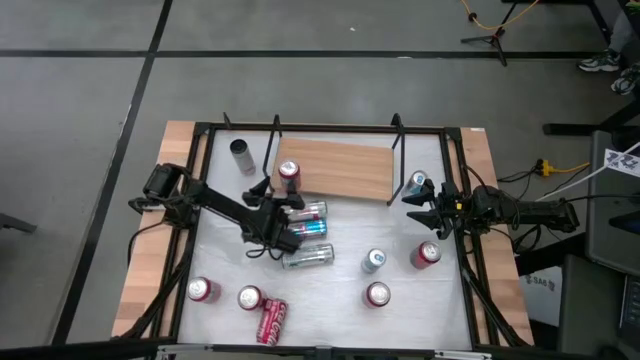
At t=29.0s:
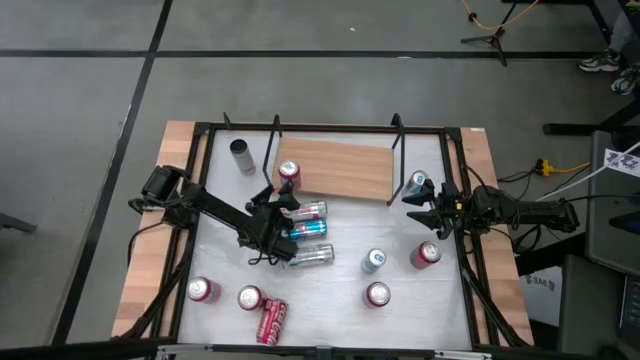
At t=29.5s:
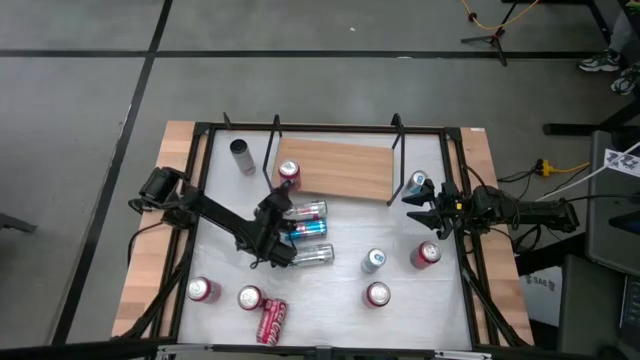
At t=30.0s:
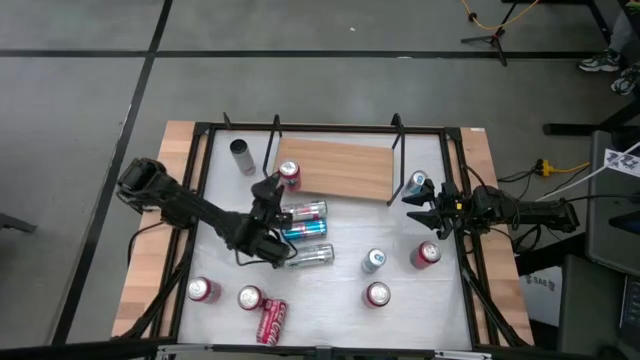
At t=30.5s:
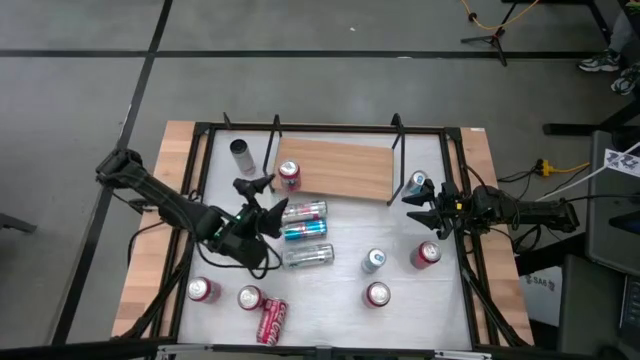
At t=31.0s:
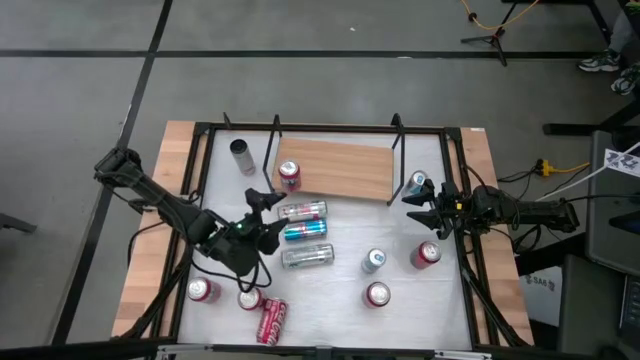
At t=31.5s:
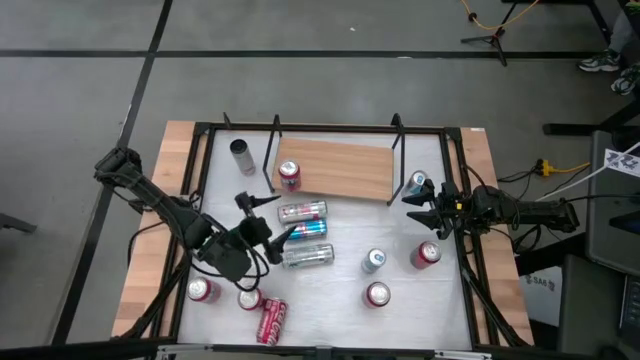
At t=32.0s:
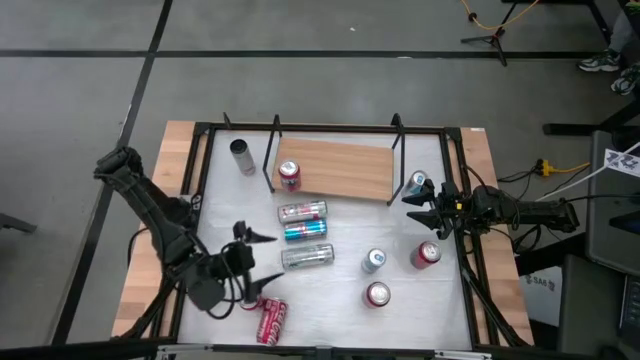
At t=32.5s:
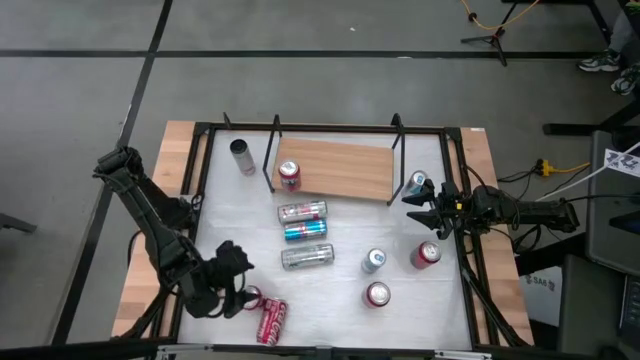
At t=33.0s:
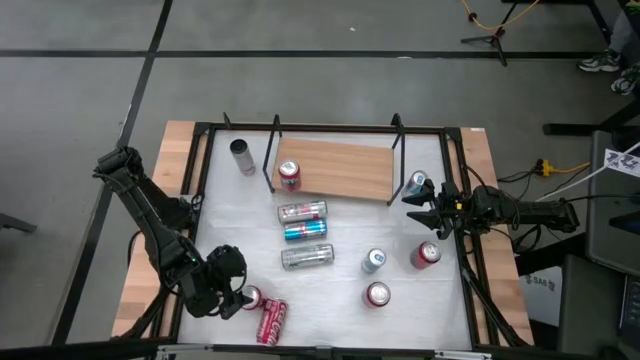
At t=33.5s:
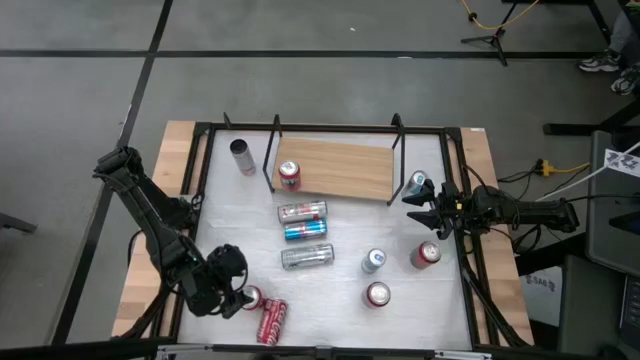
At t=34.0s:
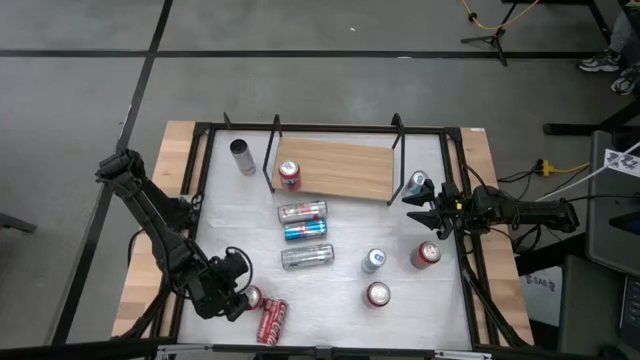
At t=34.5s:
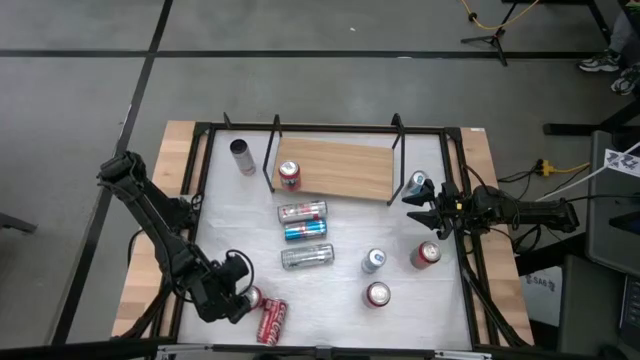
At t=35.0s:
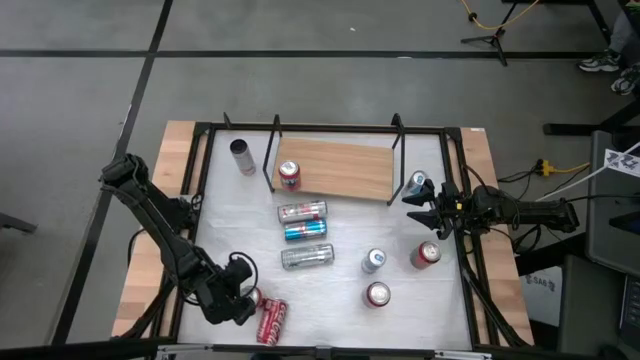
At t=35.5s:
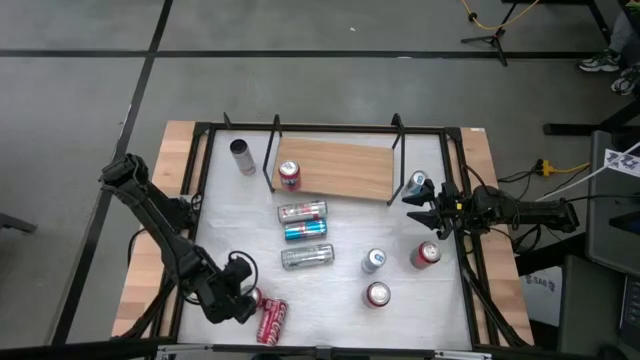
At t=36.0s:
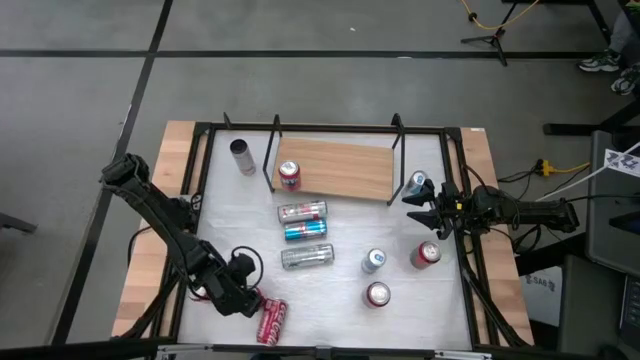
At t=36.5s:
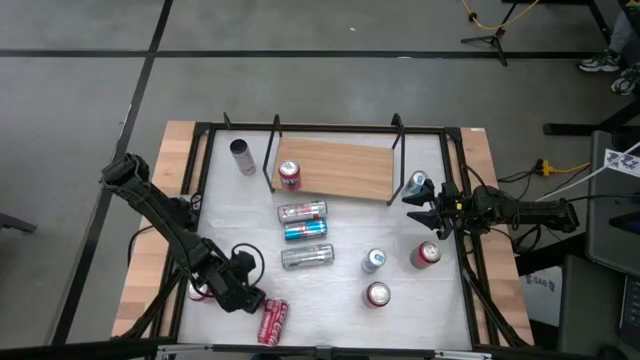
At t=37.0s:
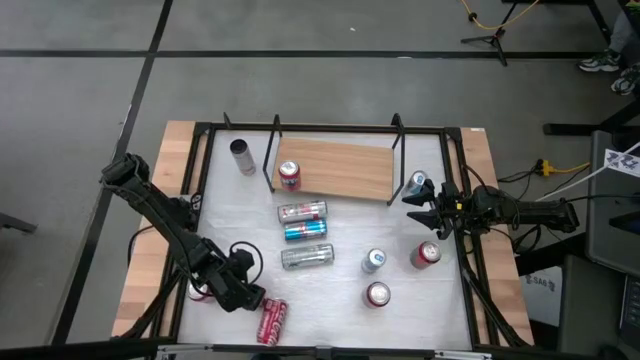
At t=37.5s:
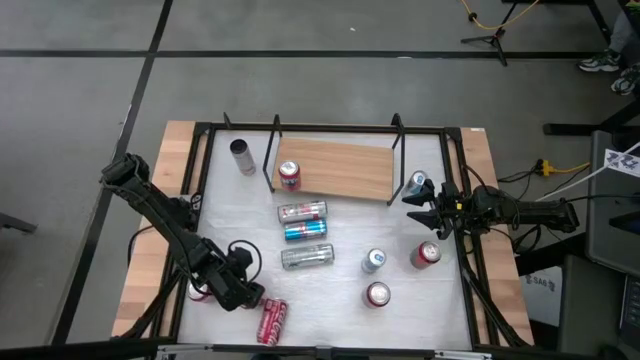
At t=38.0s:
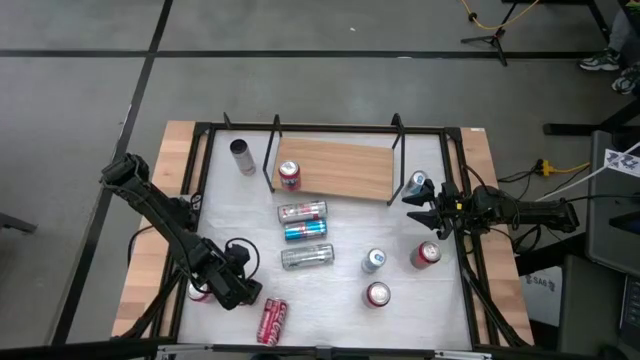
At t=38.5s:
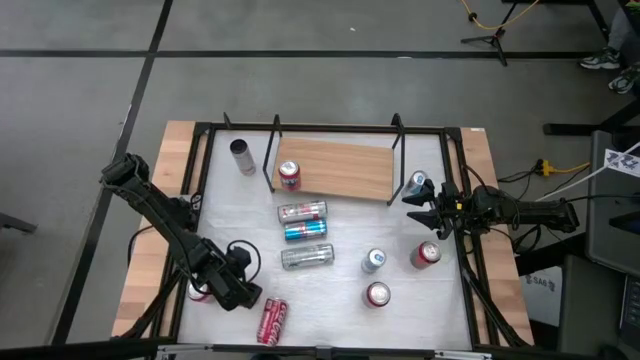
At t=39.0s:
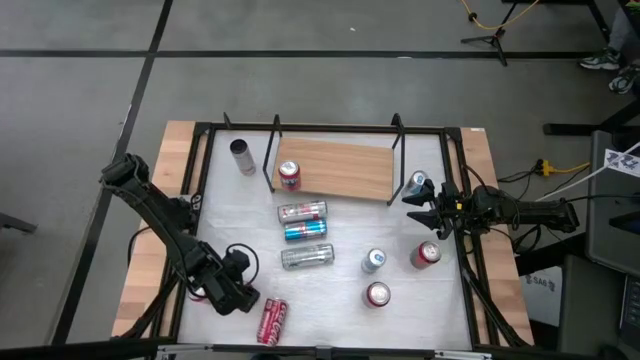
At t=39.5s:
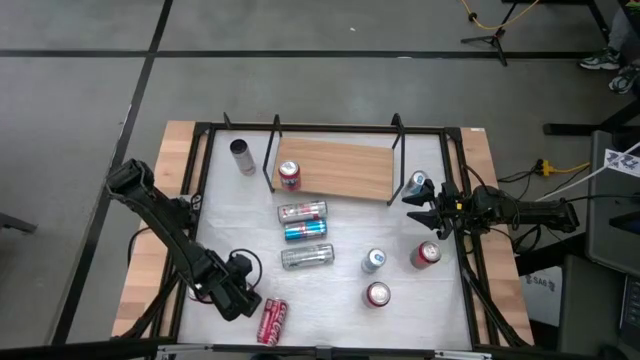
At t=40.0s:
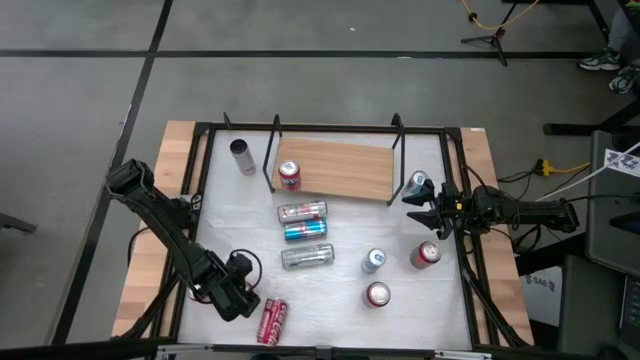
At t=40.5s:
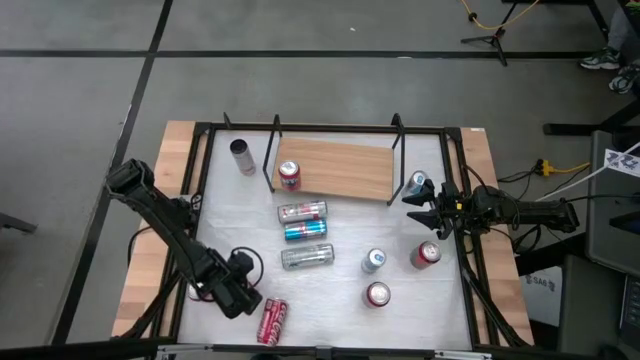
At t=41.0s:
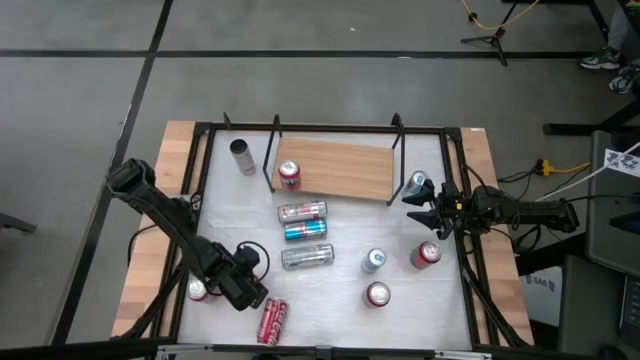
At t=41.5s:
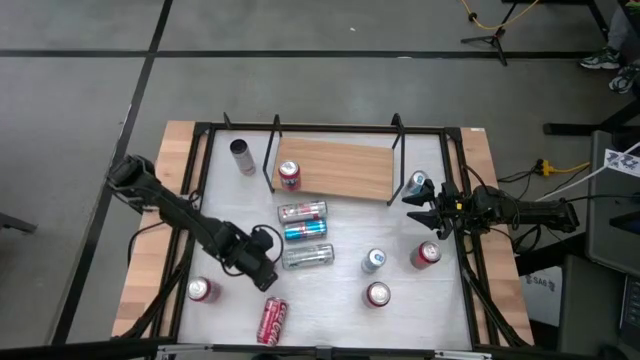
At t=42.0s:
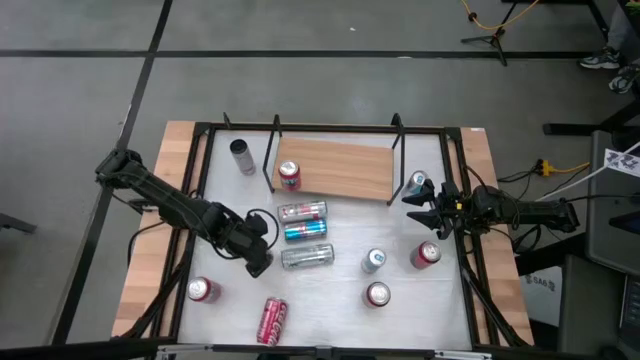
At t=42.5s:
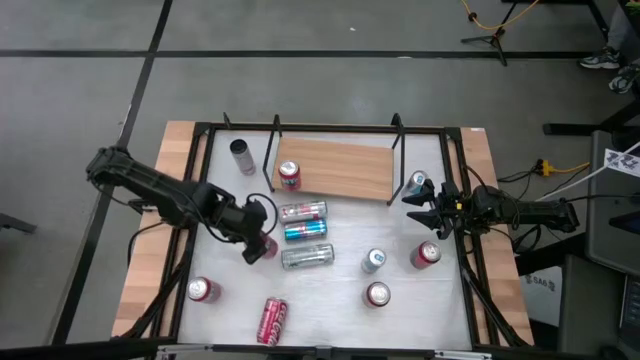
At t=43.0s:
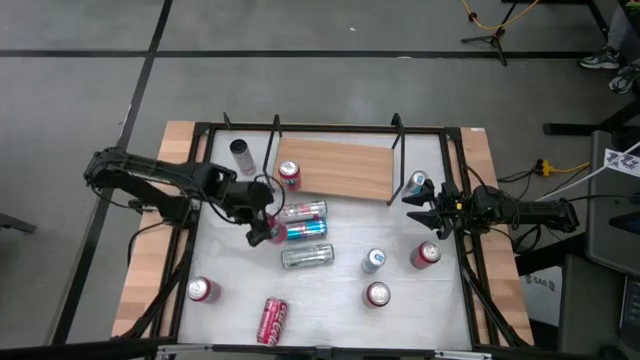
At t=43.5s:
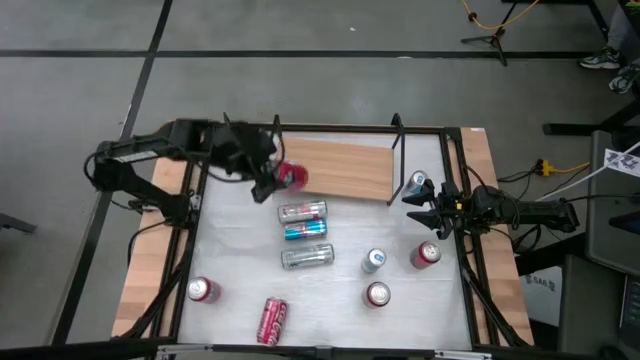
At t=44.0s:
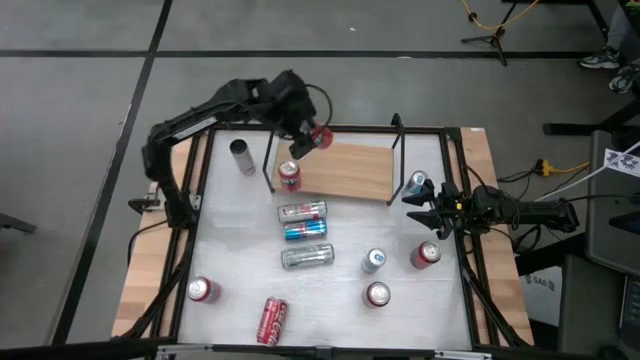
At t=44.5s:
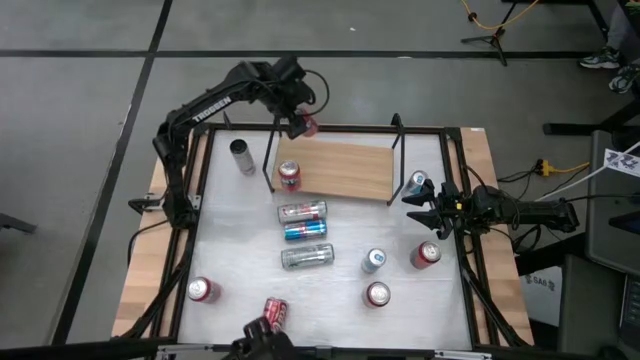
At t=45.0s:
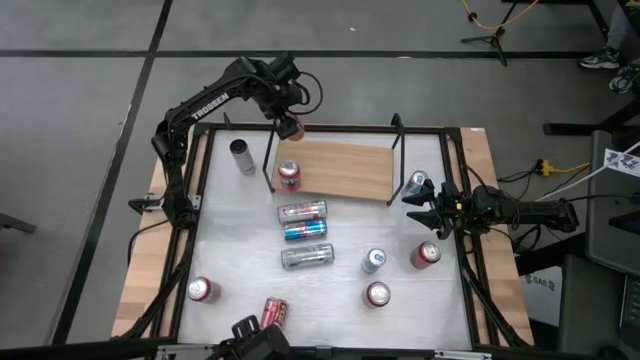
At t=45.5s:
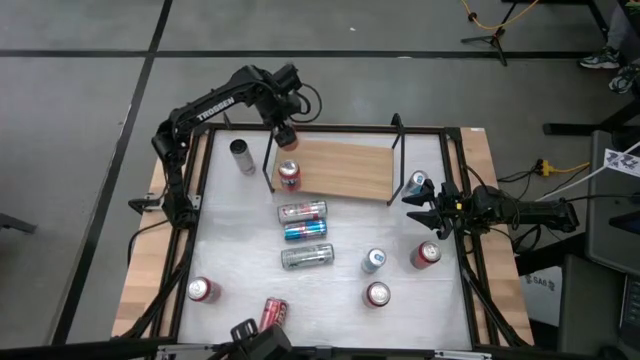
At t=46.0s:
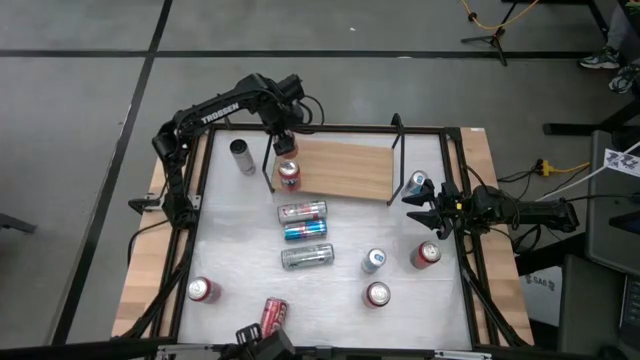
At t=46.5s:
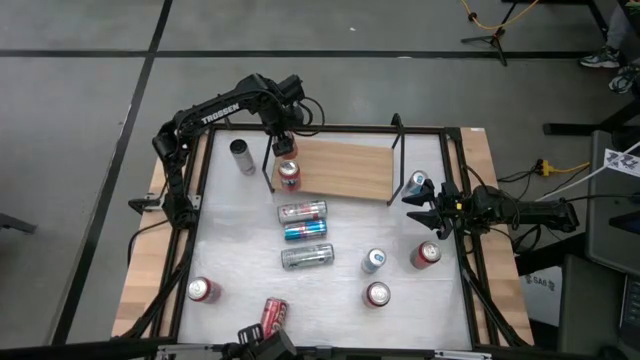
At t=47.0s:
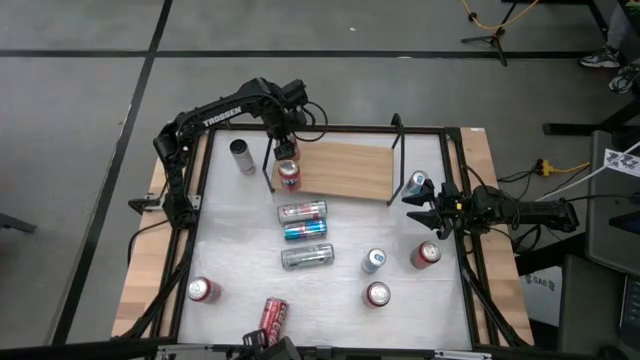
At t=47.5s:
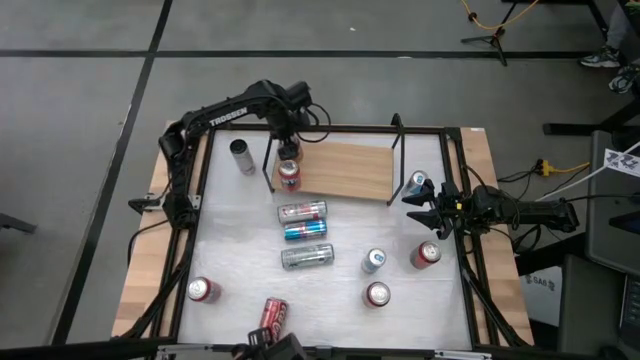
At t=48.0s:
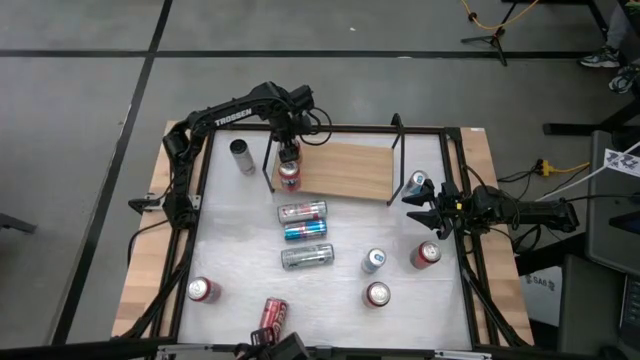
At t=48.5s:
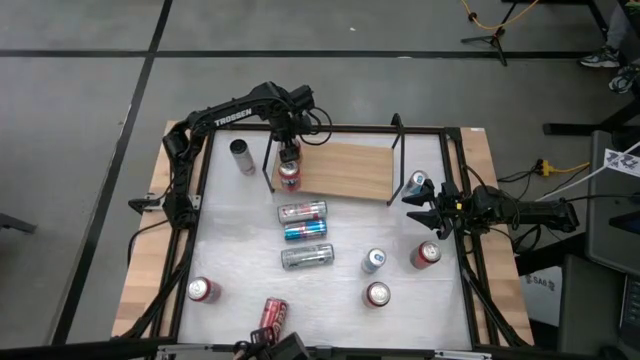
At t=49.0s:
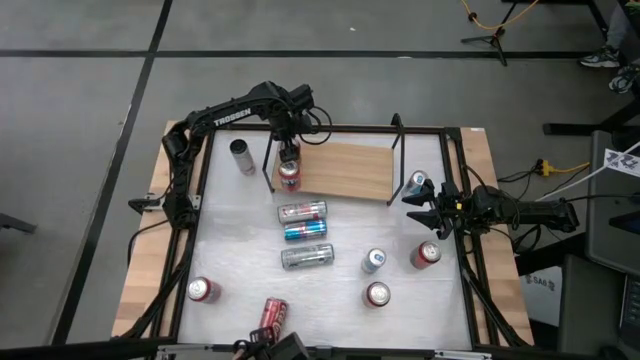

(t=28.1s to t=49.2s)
Task: Place canned beverage on shelf
Put the right red soda can on the shelf aligned with the red soda can
